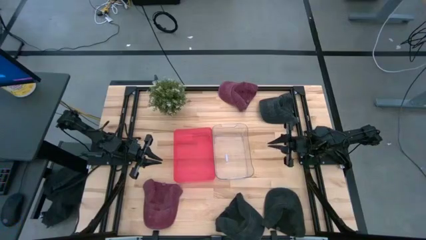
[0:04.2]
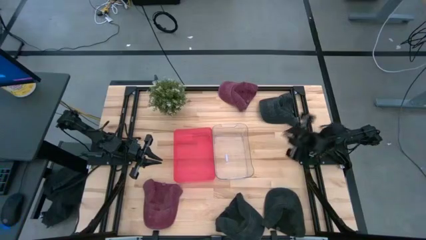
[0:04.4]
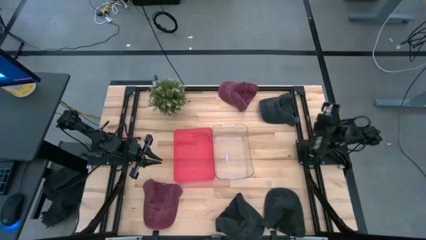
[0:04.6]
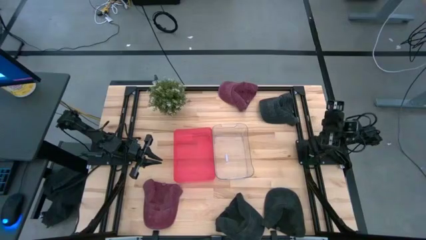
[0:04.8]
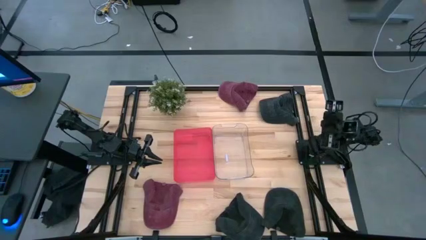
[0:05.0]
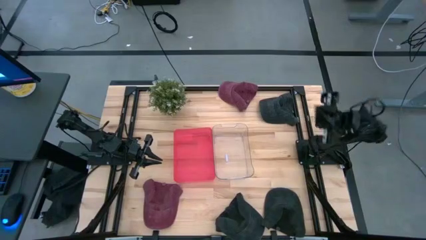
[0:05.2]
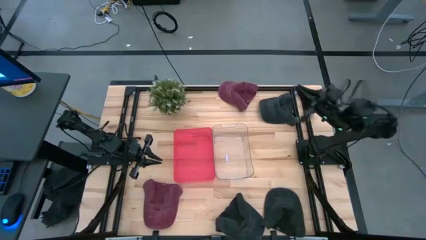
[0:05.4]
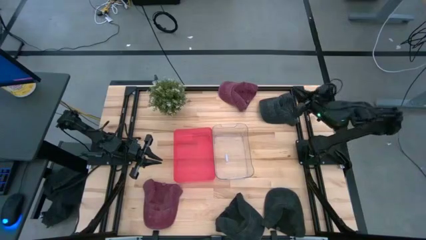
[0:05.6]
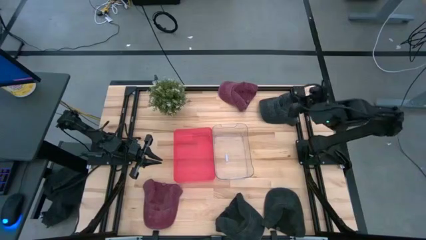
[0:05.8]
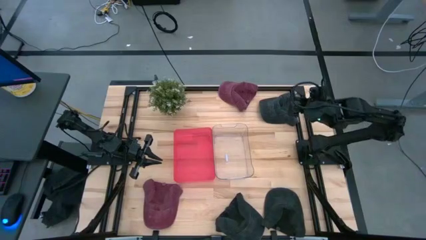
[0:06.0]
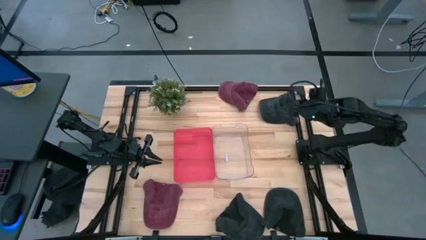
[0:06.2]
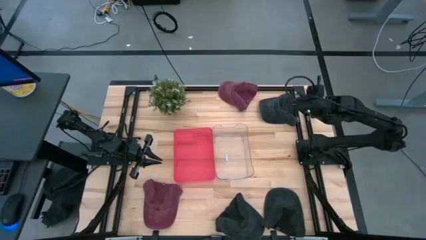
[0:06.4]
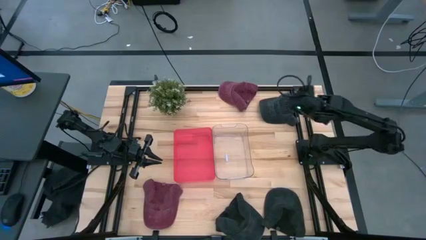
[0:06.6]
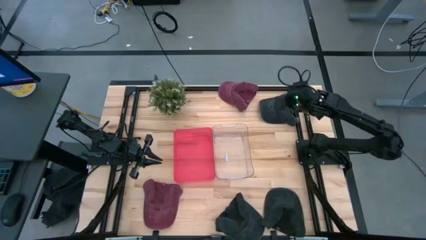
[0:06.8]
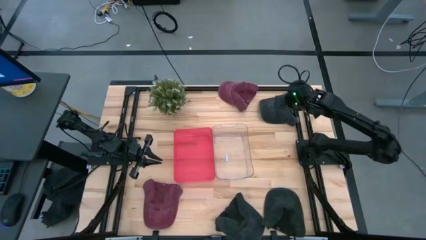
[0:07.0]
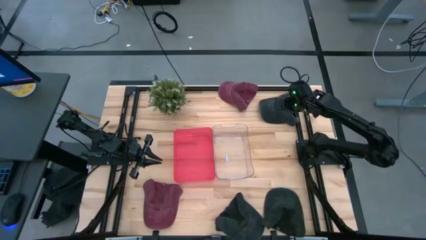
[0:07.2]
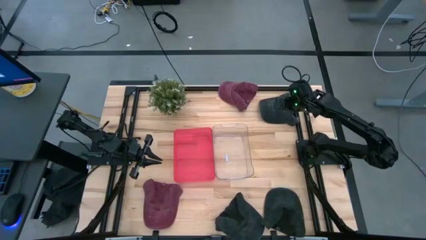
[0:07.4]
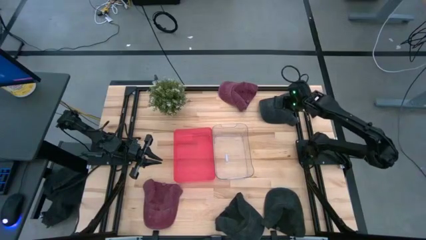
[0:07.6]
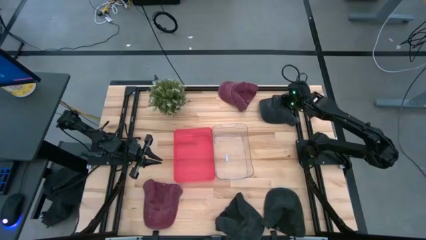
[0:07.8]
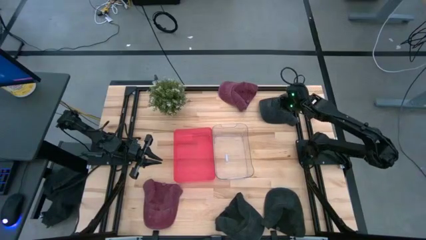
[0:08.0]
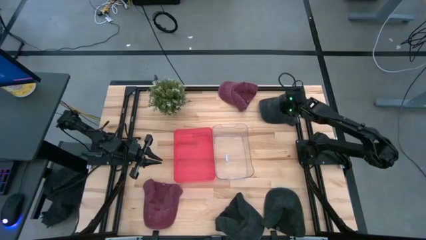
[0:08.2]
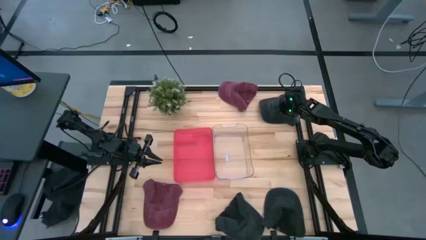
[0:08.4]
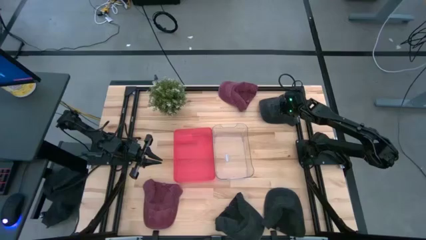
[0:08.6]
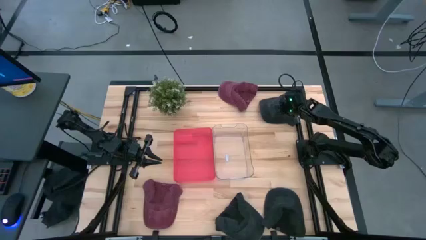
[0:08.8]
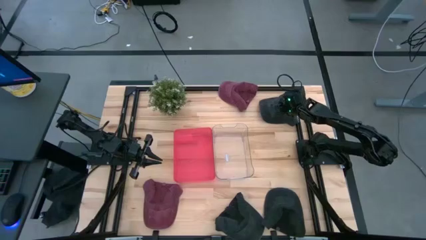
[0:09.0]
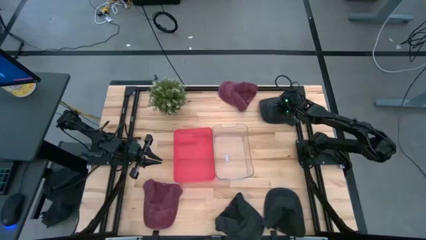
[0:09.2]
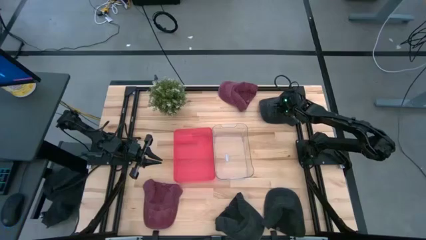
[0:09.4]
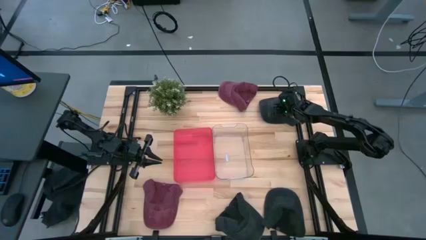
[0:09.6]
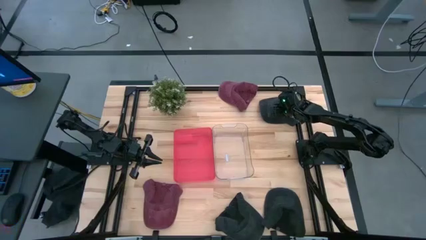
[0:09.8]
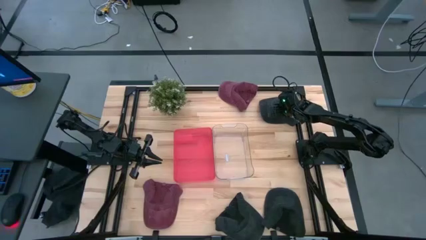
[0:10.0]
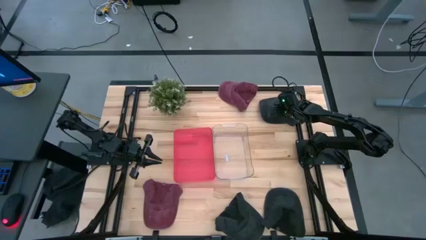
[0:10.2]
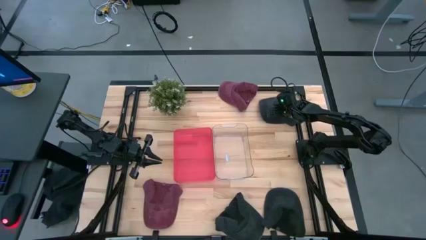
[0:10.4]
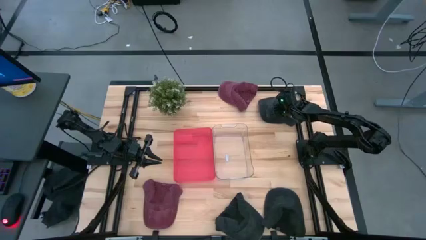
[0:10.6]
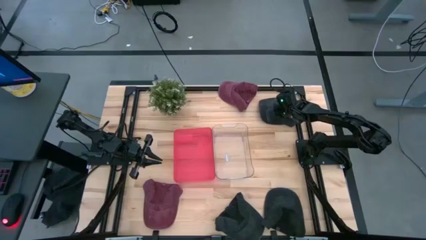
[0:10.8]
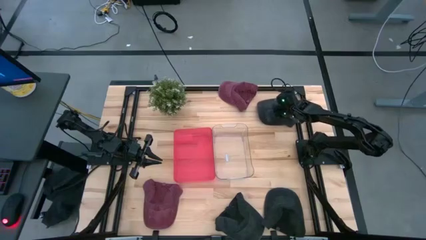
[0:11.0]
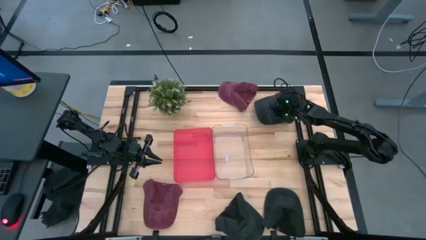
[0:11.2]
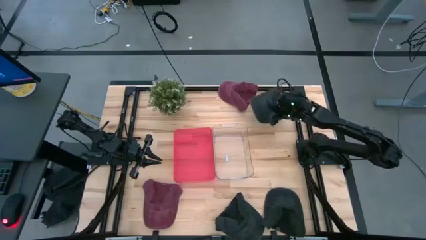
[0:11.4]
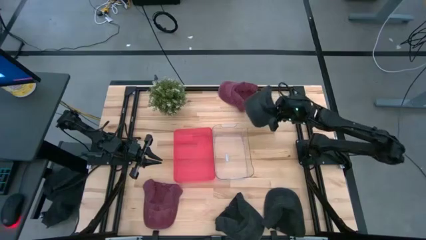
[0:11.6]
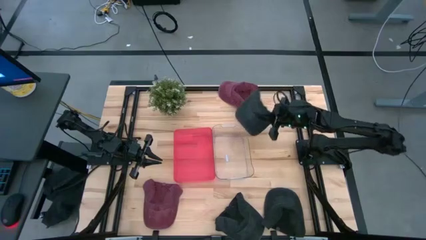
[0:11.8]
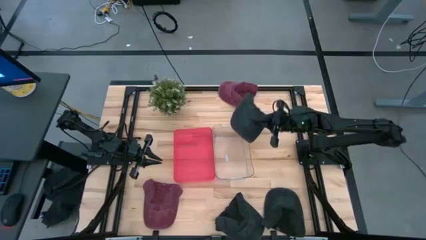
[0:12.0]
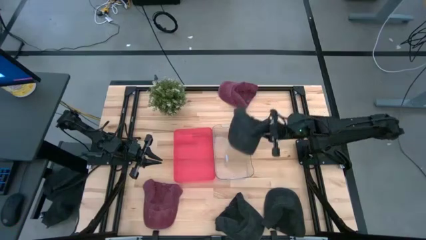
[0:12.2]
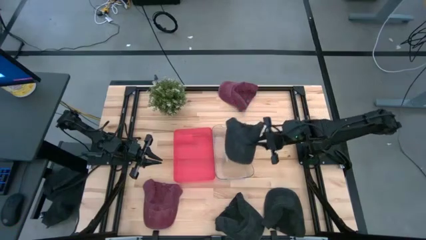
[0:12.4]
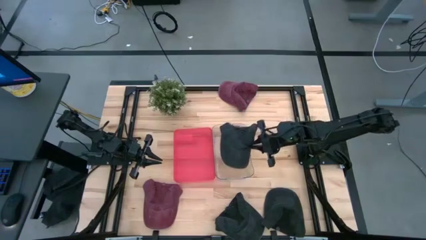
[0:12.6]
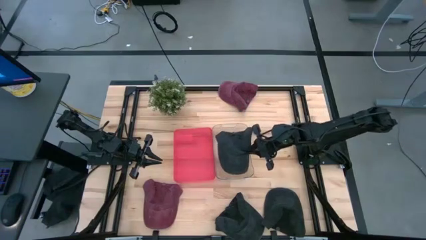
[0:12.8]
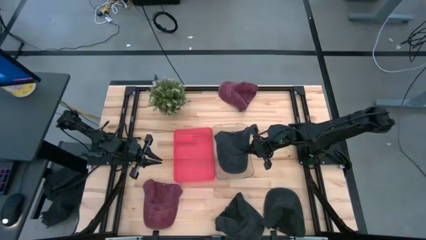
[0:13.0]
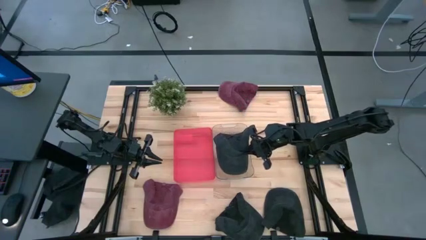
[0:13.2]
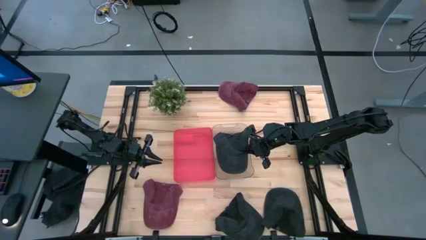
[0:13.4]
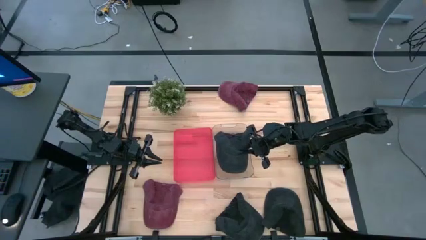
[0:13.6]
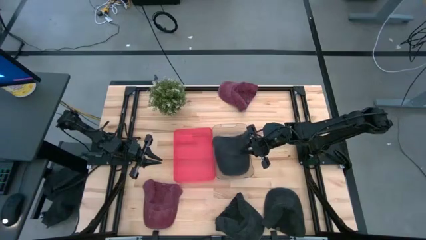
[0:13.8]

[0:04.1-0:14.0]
Task: Pick & Place hat
Put the top black cap into the transparent bin

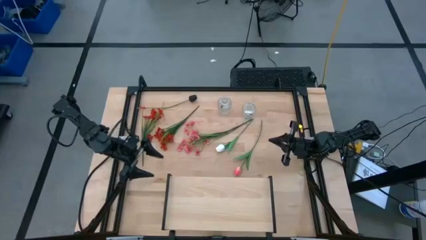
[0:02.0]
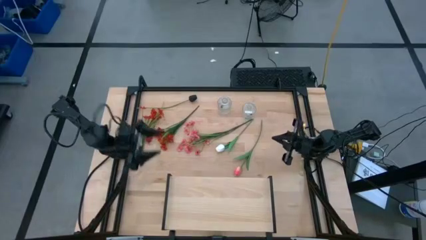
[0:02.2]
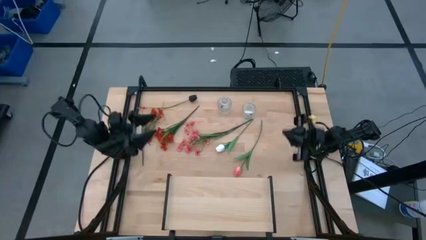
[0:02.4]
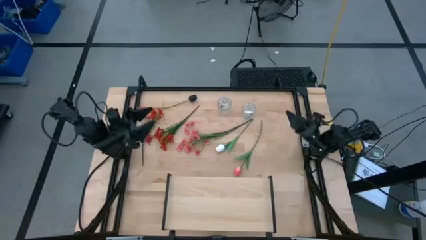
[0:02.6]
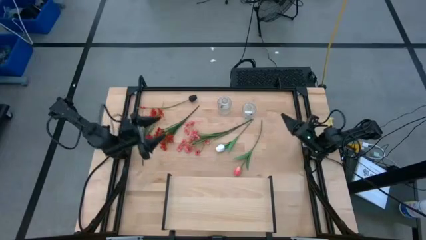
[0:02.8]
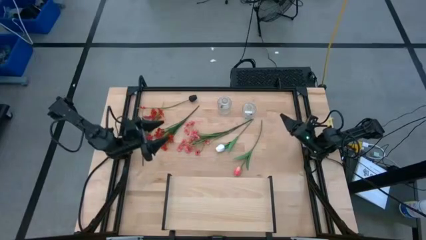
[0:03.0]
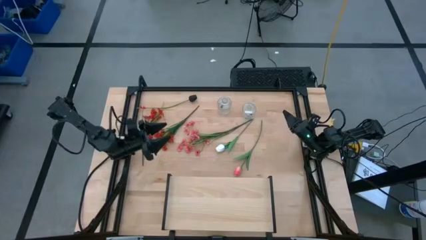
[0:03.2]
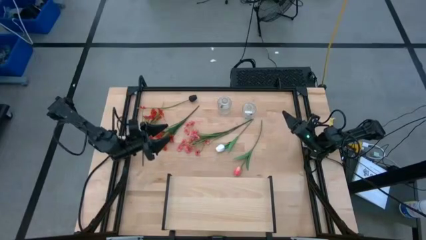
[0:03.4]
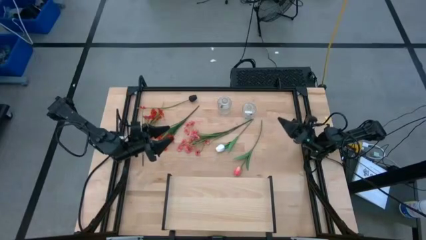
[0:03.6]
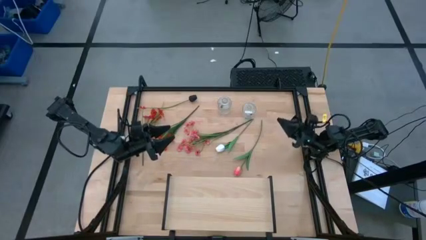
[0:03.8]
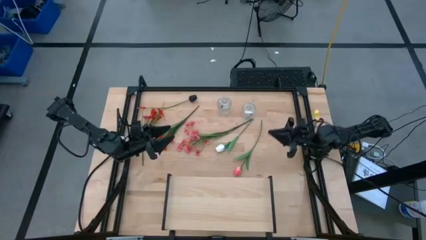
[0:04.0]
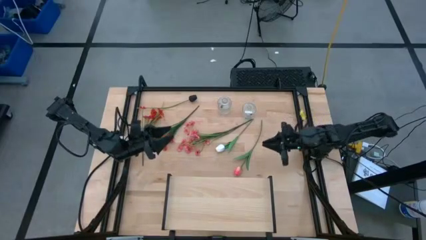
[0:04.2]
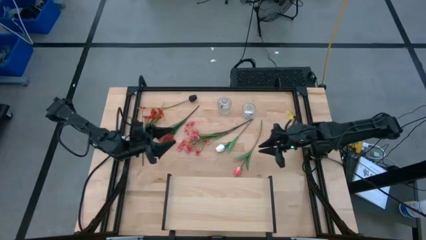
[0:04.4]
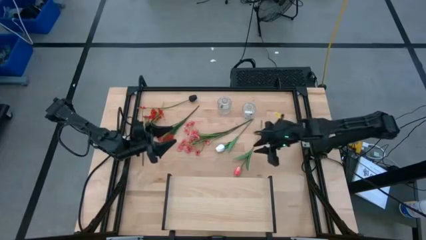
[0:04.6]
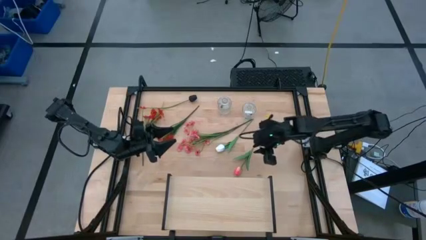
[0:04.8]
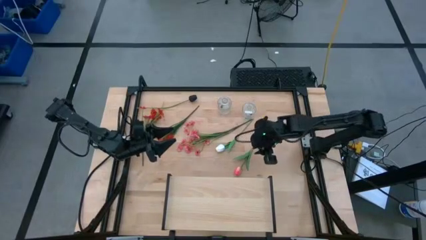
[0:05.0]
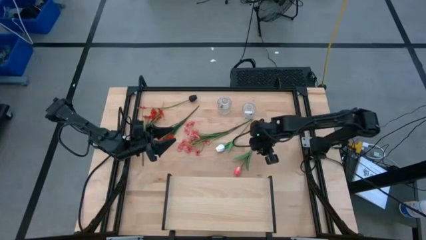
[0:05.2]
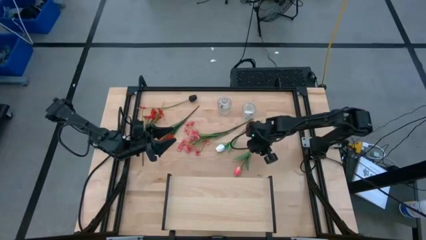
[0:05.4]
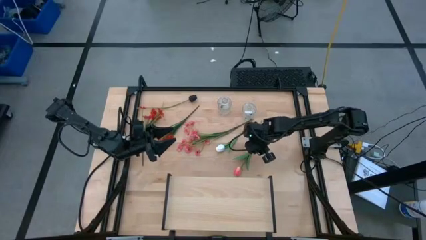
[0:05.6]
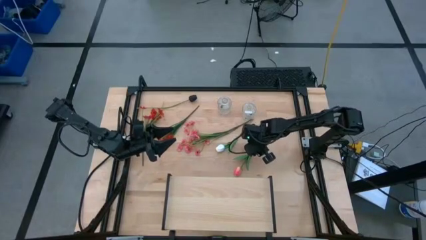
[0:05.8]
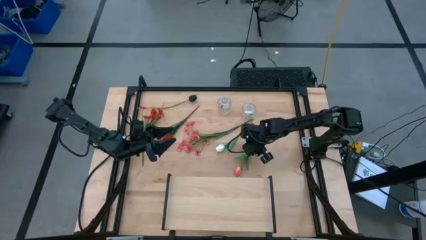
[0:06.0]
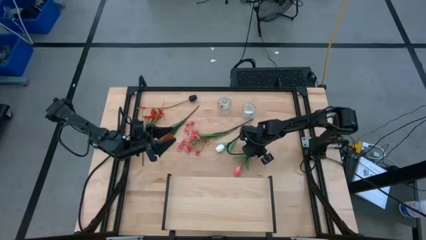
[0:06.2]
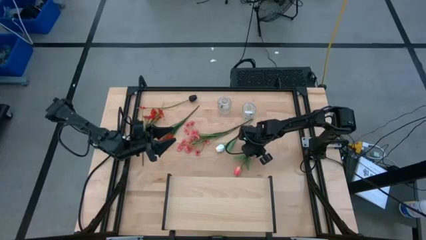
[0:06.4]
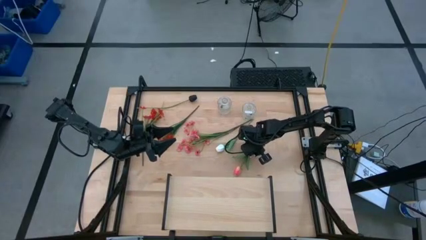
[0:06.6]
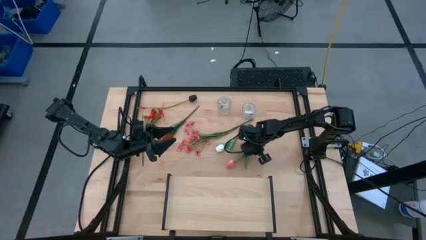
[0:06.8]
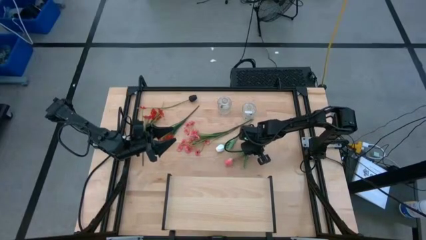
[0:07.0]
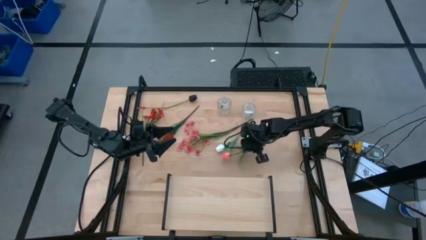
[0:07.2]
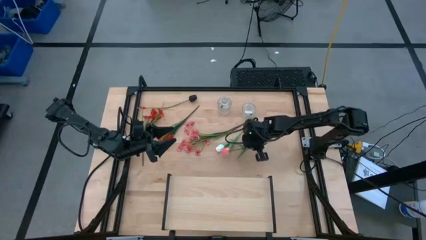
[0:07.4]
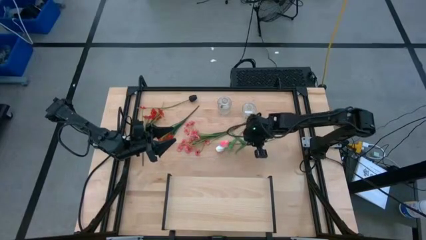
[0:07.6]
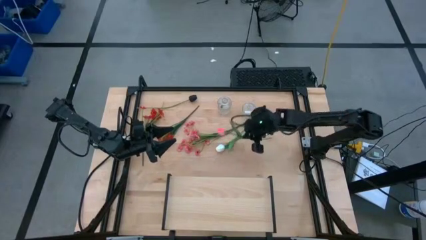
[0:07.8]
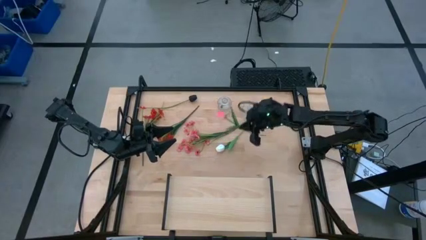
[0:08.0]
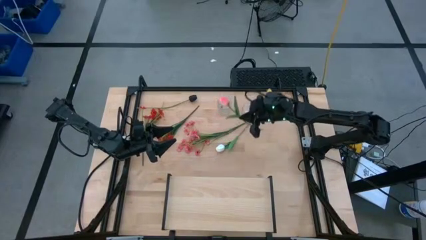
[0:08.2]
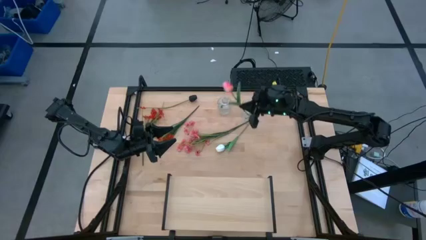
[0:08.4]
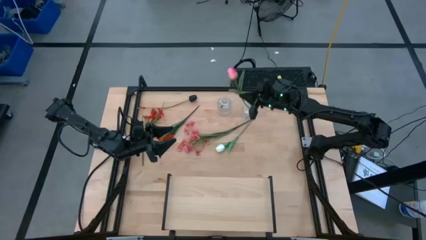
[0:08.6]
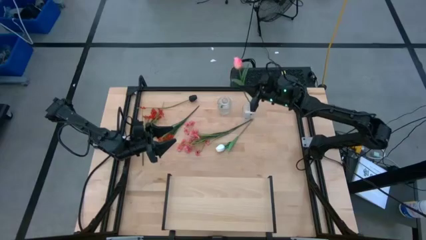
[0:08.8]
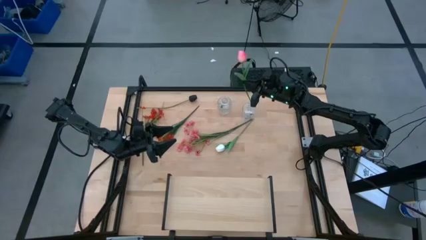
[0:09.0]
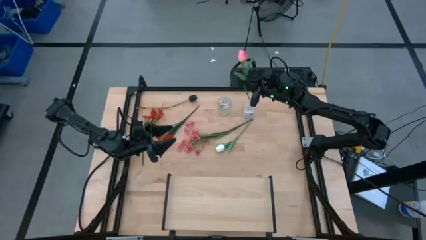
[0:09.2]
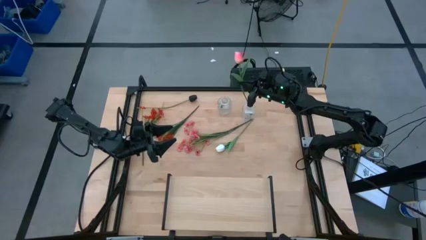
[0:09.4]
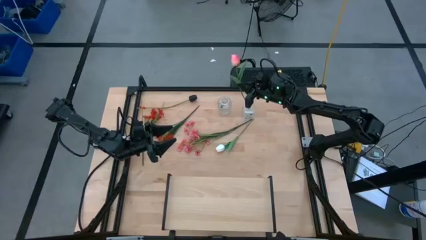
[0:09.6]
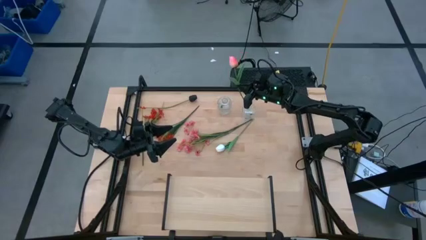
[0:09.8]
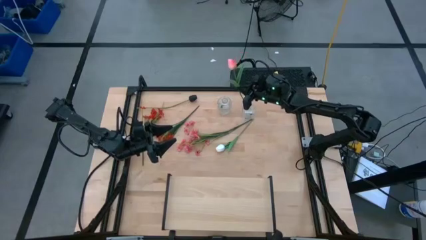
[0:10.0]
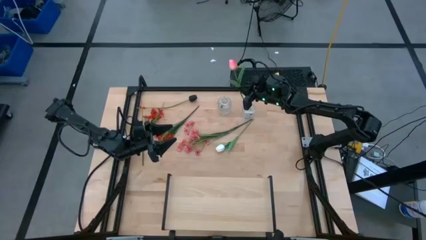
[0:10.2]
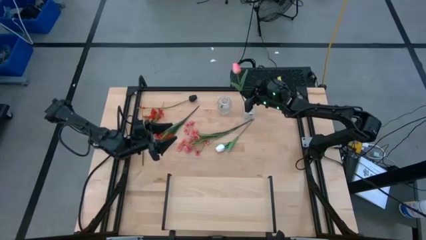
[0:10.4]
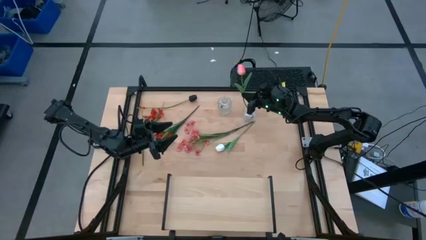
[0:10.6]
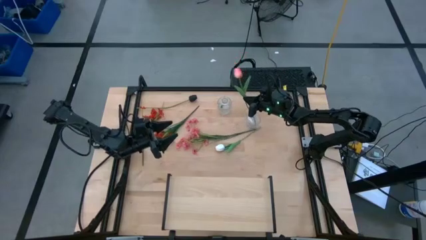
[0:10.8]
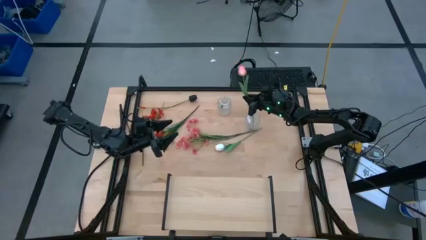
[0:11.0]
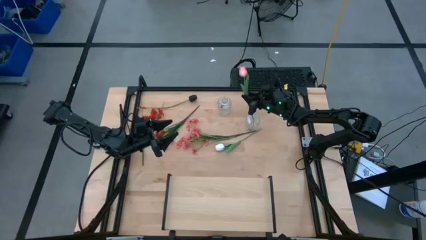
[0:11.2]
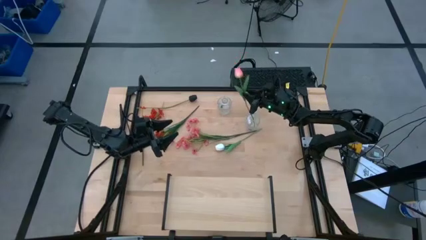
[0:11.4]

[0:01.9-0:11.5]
Task: Pick and place flowers into a vace then onto a shelf
Put the pink tulip into the right transparent vase
